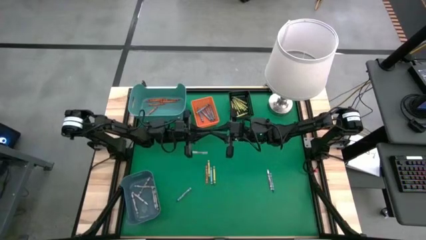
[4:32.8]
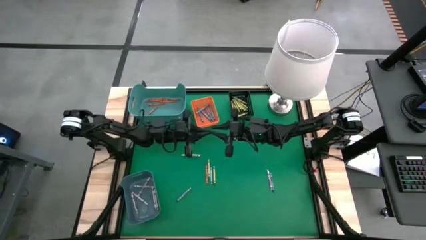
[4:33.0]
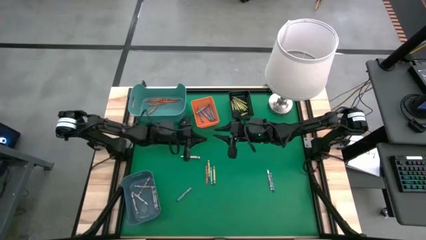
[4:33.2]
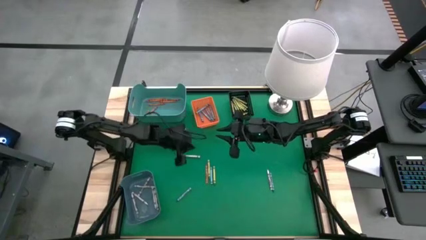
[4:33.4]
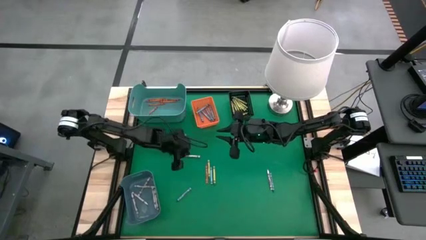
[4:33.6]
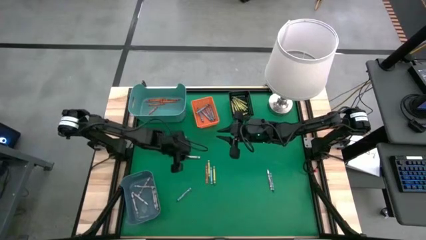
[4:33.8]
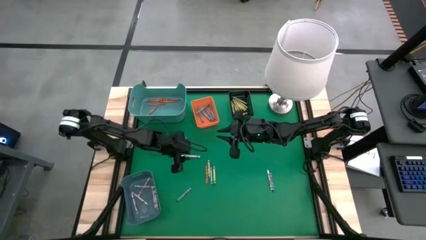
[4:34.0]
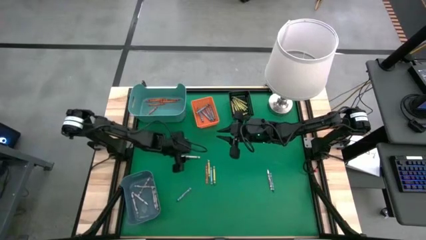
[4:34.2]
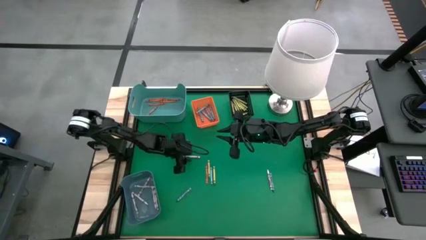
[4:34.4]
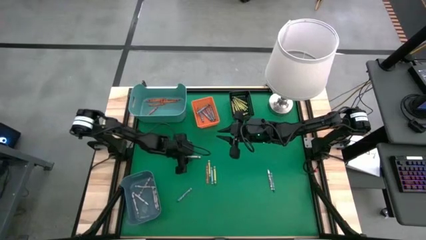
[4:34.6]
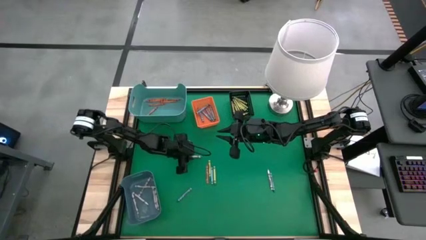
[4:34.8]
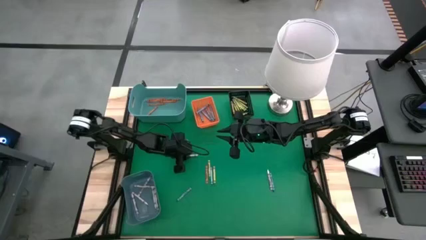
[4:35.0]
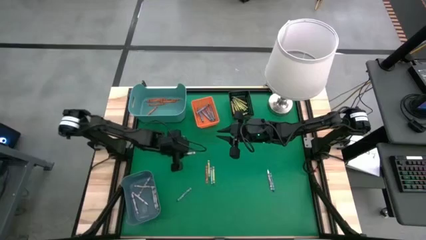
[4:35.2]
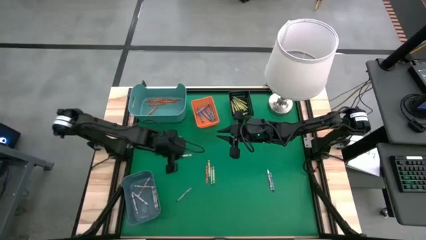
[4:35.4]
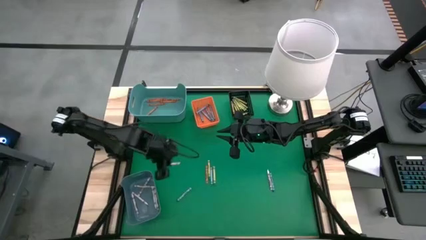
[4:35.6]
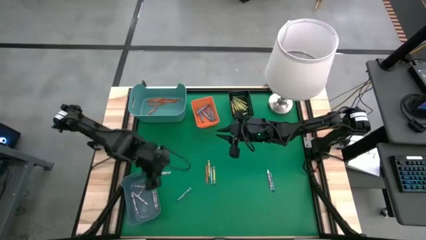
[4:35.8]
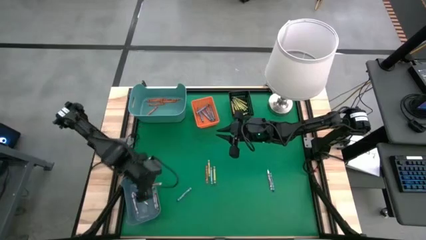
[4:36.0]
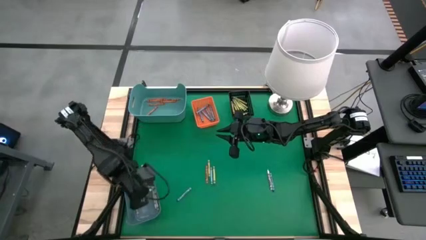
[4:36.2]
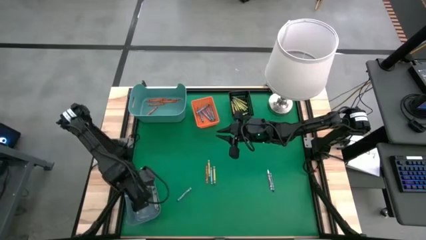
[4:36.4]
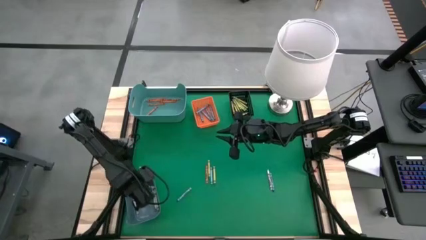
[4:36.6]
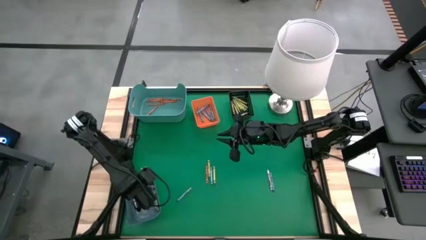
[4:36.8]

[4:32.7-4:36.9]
Task: Sort crayons
Put the white crayon into the blue bin

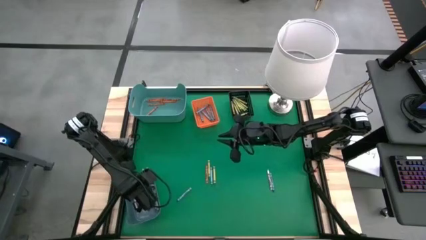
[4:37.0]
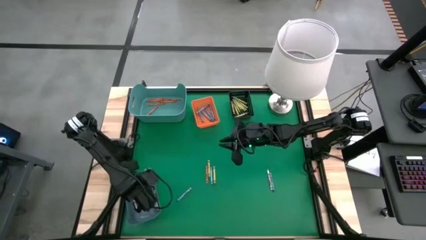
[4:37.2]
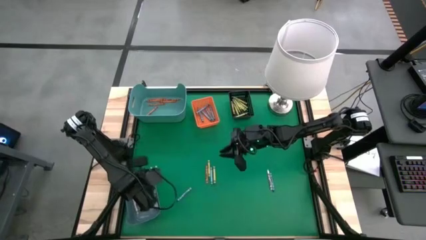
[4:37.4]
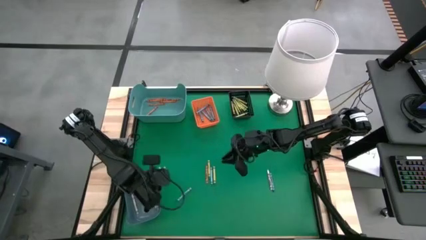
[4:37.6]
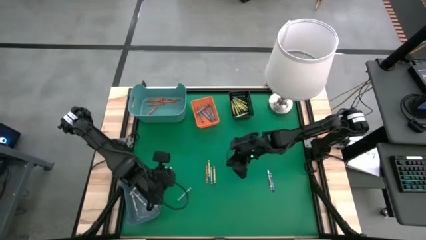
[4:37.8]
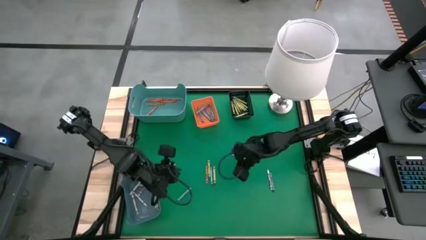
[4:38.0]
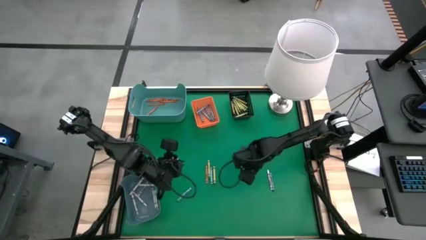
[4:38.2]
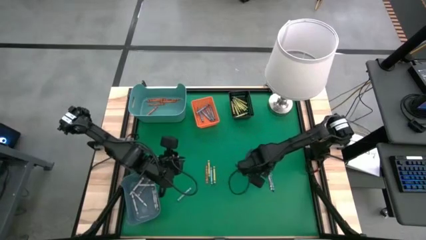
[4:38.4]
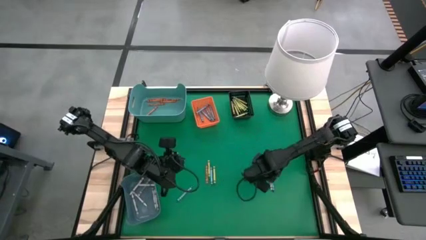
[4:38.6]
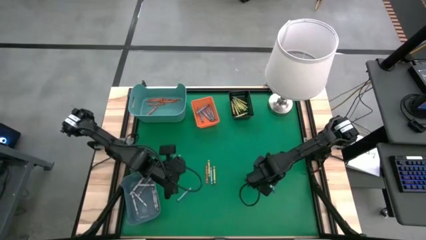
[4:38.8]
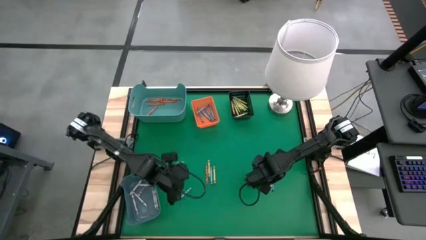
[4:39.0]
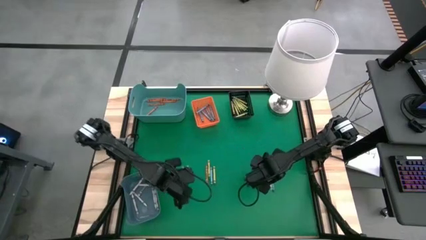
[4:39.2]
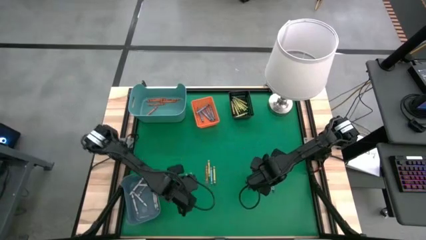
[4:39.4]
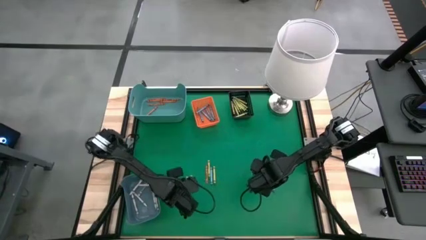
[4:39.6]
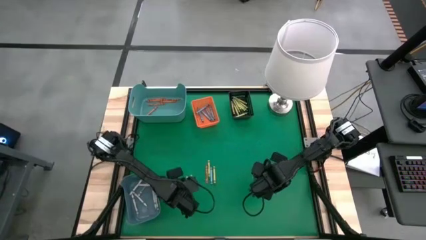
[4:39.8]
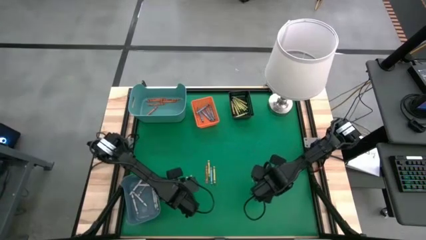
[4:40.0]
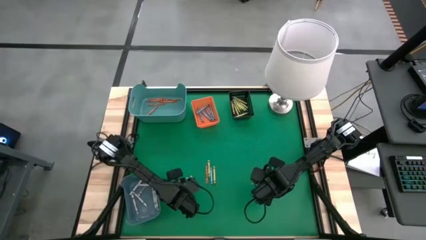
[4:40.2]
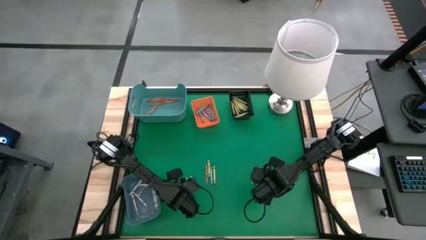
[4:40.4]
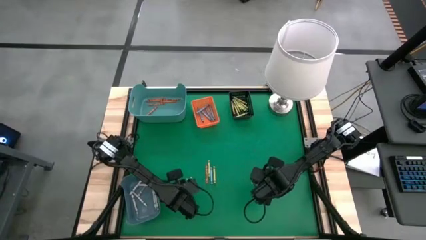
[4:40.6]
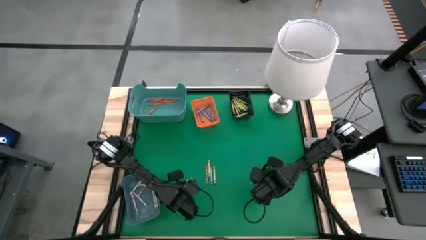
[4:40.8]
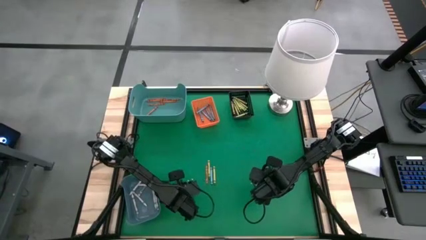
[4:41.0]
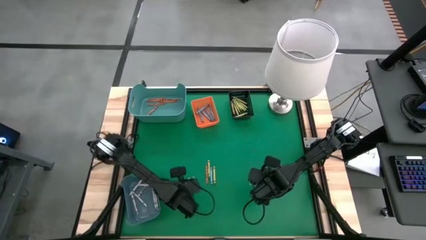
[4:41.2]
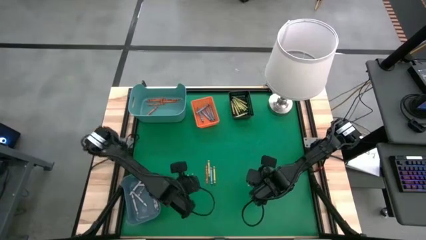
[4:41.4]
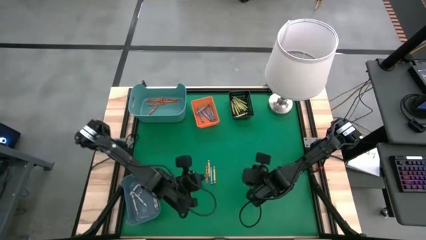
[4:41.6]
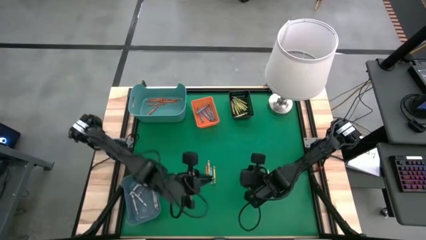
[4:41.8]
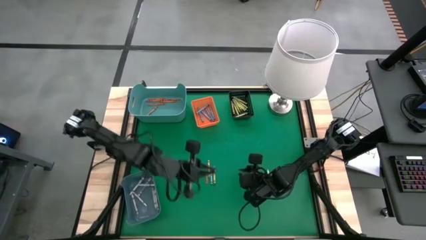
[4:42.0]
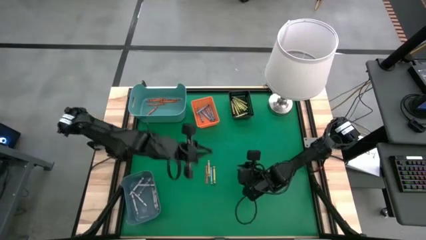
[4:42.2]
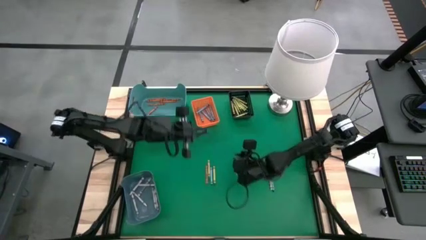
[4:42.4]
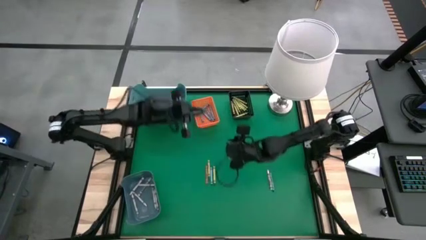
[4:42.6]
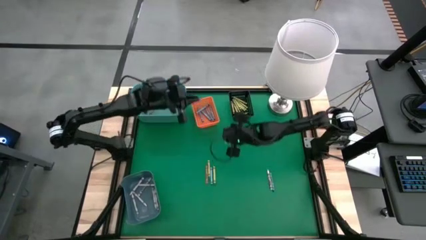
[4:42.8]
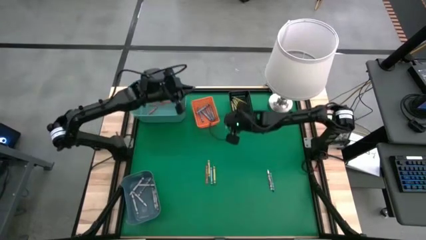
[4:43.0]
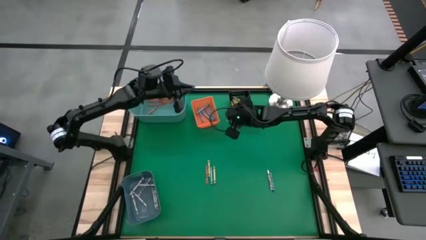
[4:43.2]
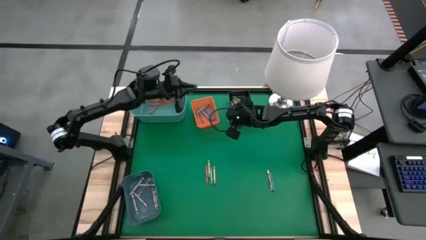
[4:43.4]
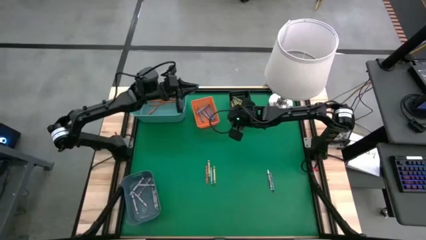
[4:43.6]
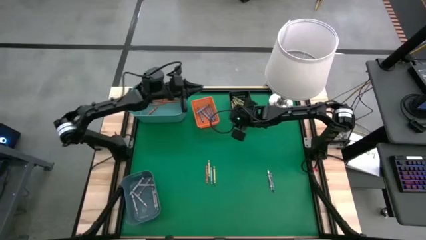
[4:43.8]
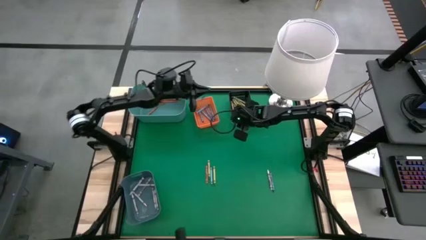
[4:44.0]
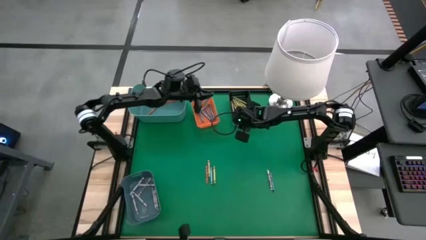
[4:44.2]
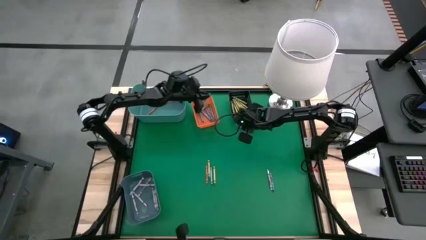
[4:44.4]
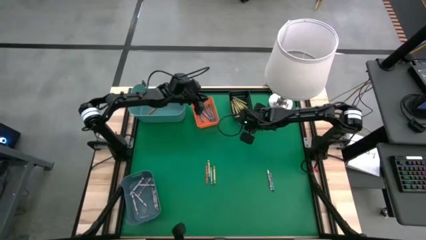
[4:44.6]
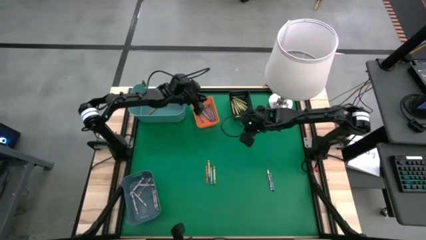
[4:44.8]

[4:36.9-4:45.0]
Put the blue crayon into the orange bin
